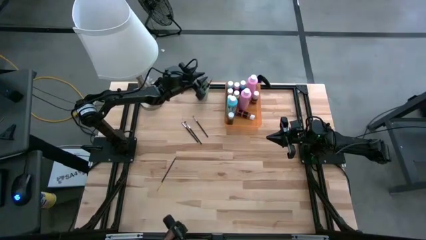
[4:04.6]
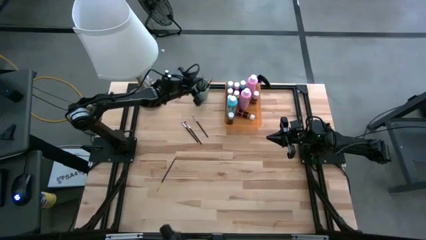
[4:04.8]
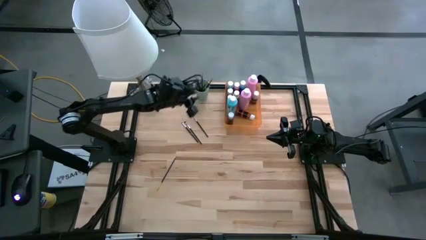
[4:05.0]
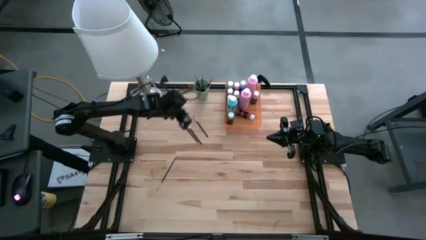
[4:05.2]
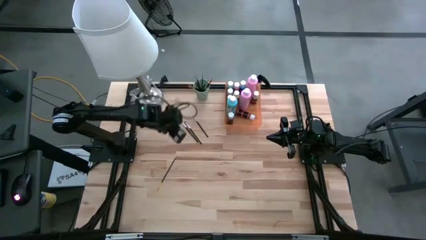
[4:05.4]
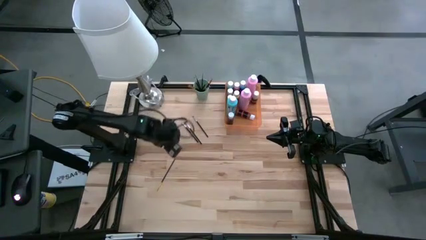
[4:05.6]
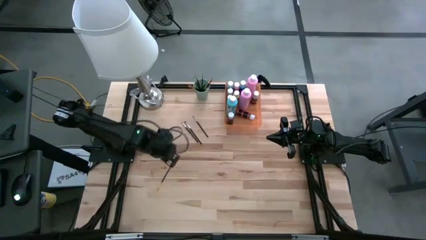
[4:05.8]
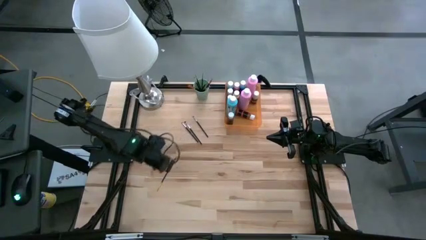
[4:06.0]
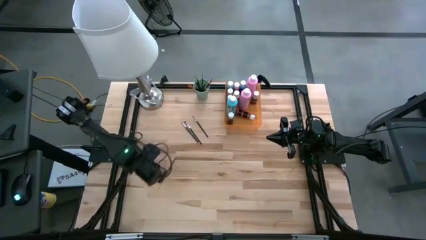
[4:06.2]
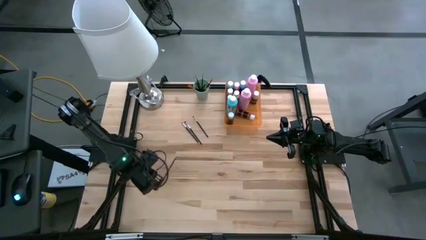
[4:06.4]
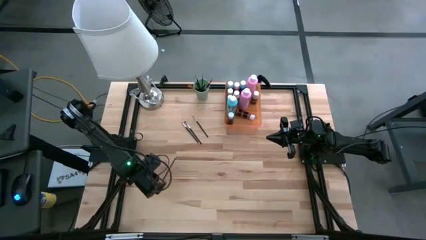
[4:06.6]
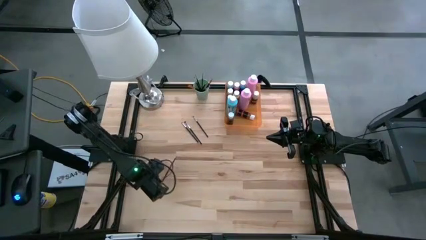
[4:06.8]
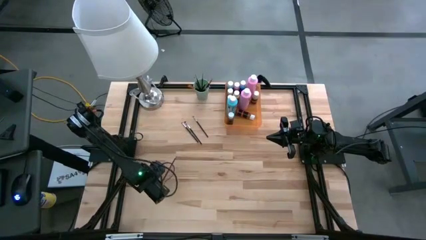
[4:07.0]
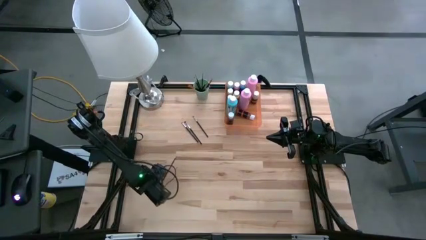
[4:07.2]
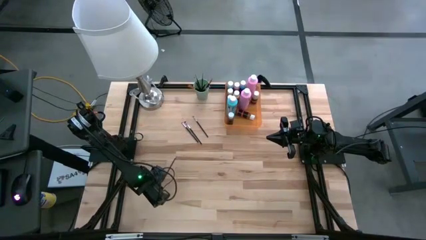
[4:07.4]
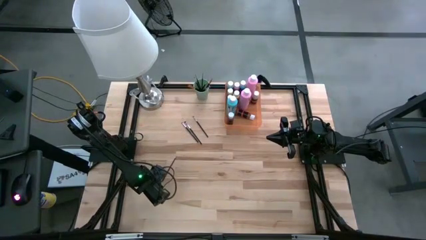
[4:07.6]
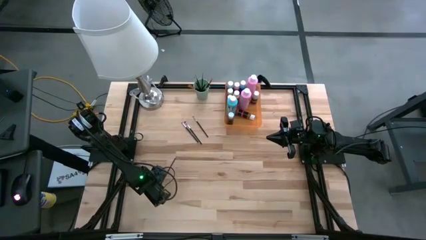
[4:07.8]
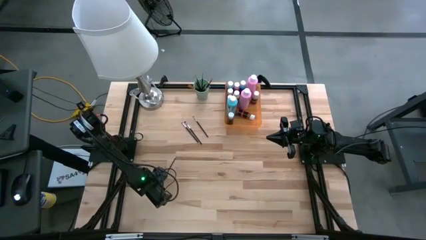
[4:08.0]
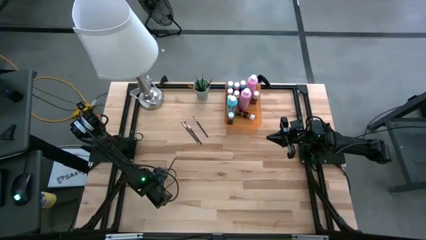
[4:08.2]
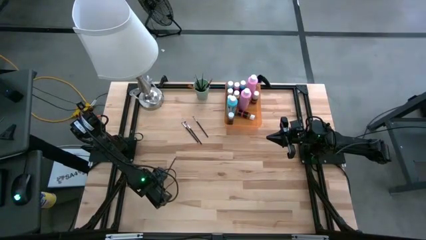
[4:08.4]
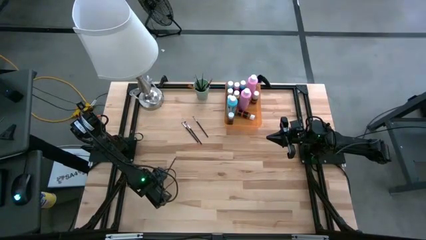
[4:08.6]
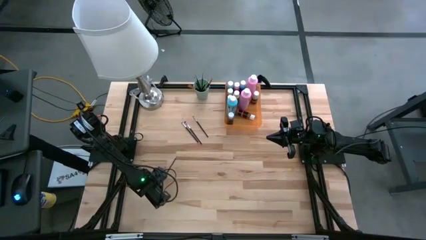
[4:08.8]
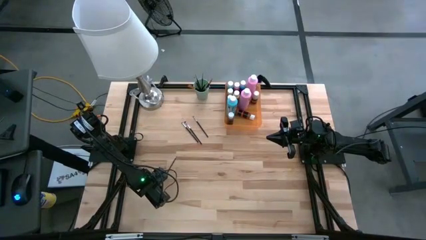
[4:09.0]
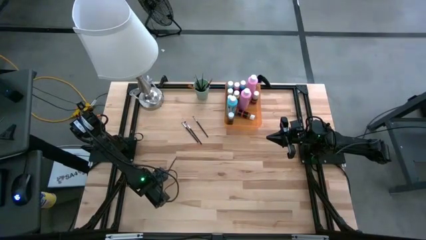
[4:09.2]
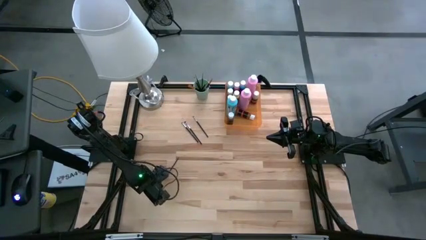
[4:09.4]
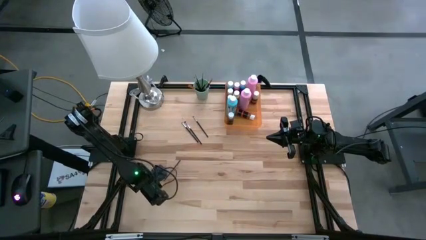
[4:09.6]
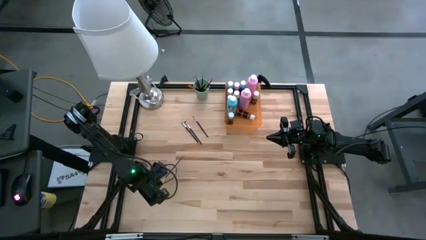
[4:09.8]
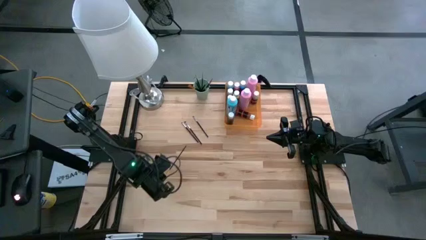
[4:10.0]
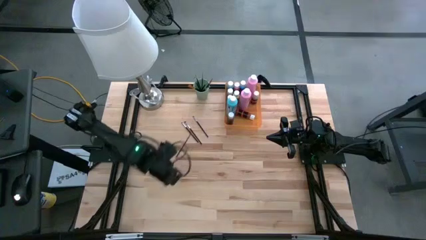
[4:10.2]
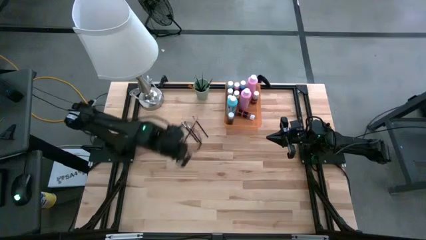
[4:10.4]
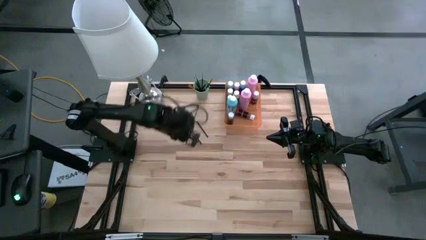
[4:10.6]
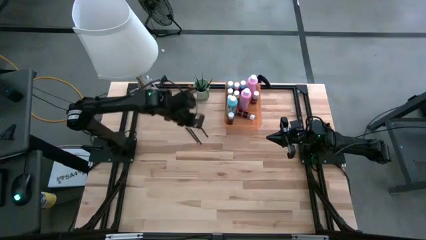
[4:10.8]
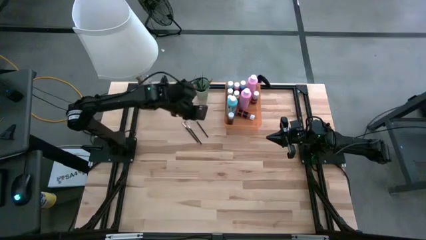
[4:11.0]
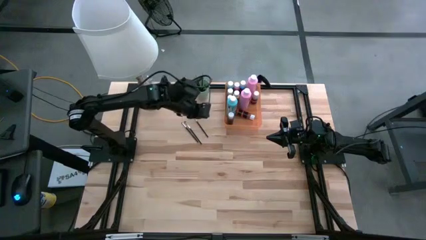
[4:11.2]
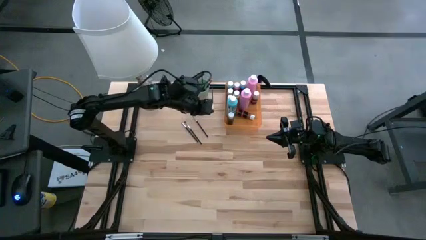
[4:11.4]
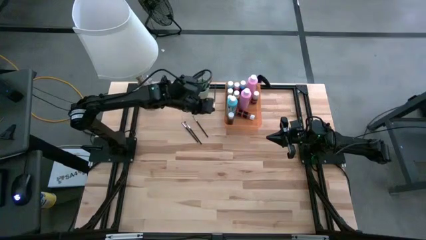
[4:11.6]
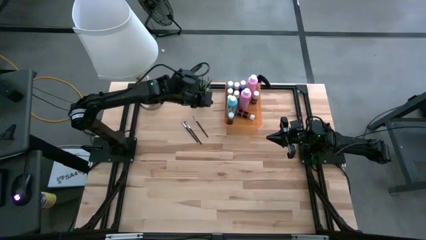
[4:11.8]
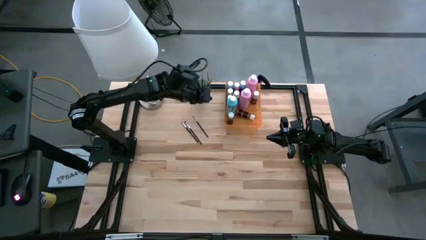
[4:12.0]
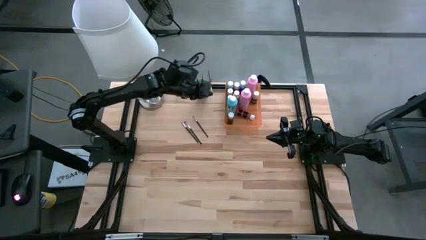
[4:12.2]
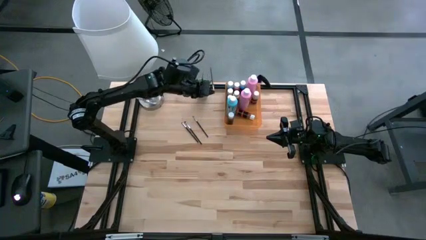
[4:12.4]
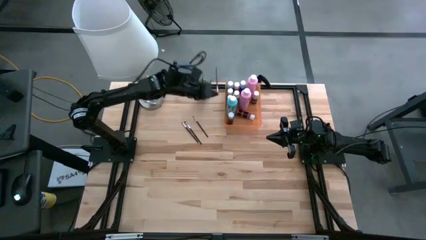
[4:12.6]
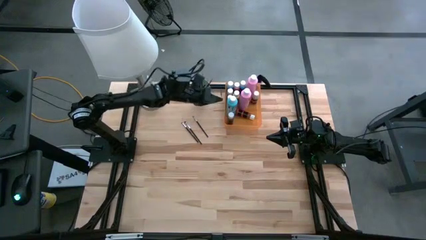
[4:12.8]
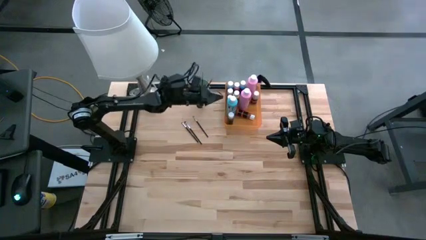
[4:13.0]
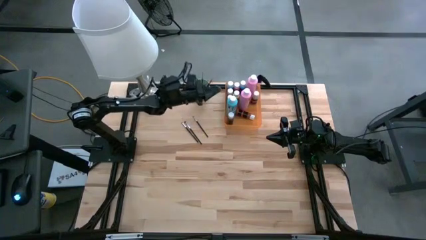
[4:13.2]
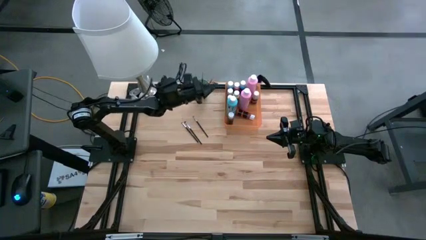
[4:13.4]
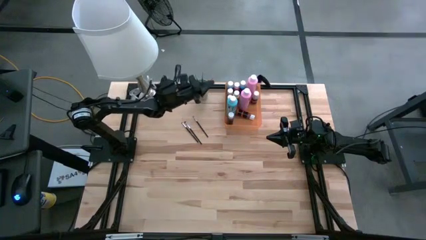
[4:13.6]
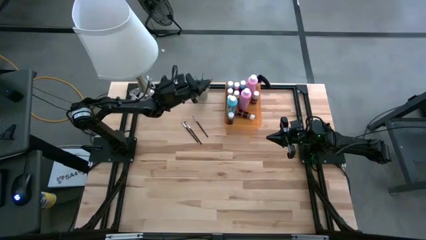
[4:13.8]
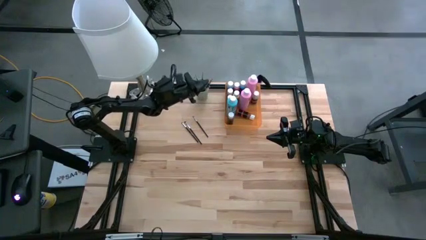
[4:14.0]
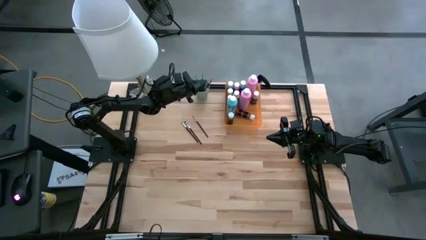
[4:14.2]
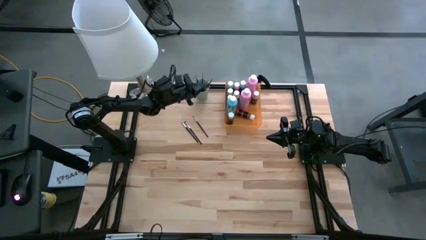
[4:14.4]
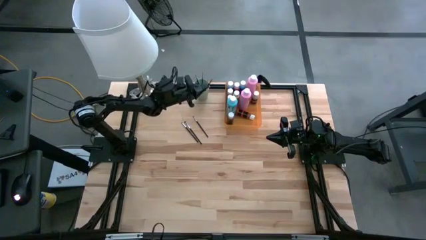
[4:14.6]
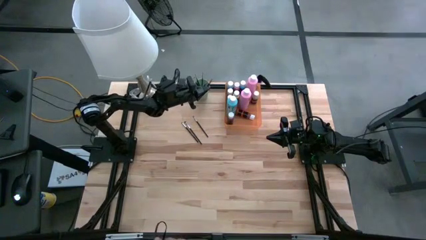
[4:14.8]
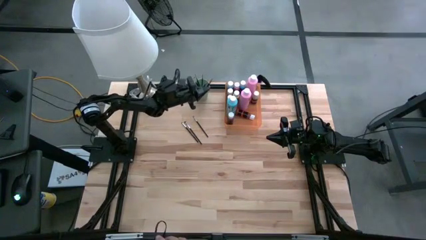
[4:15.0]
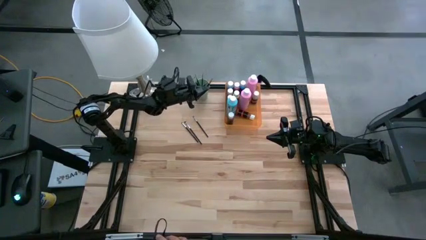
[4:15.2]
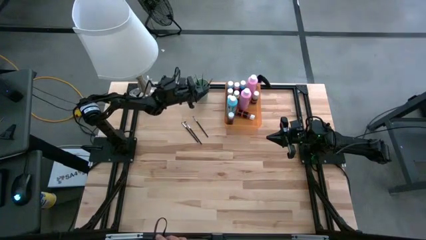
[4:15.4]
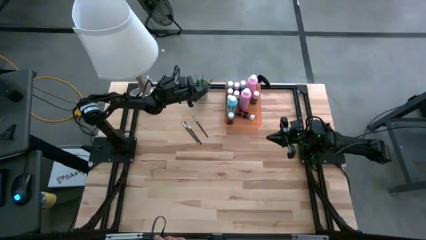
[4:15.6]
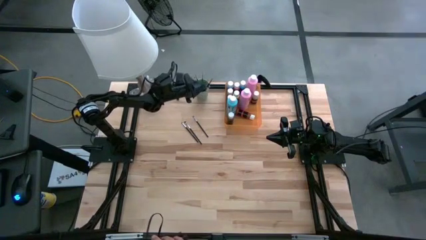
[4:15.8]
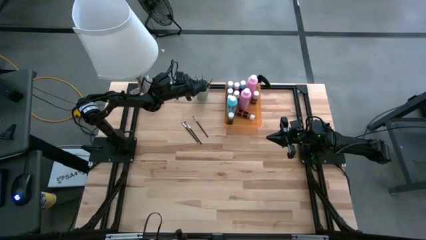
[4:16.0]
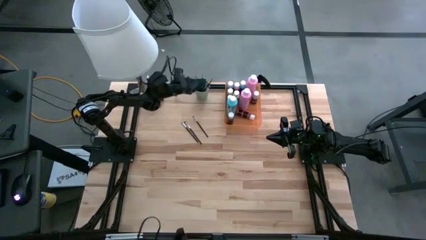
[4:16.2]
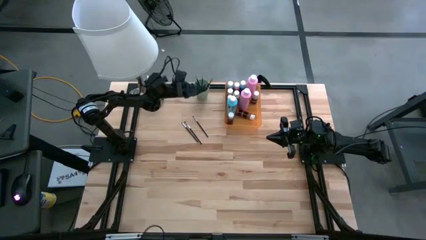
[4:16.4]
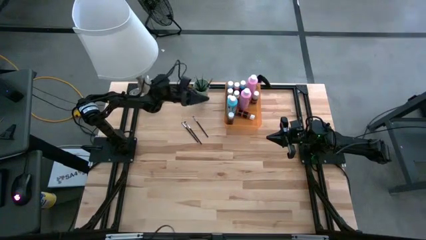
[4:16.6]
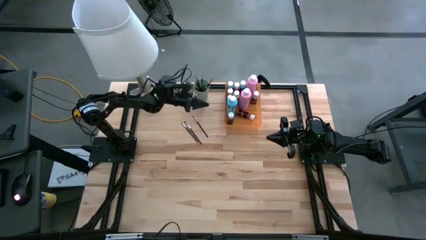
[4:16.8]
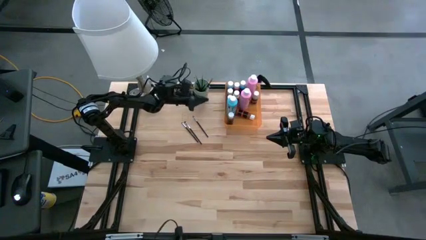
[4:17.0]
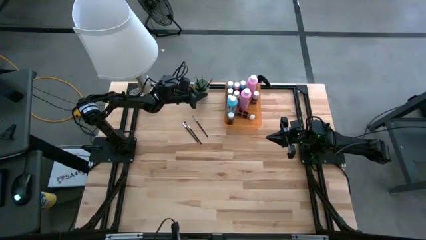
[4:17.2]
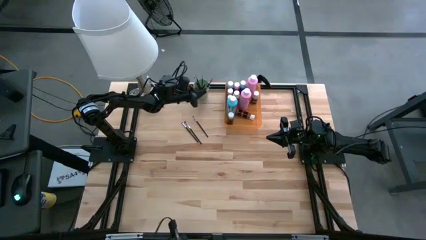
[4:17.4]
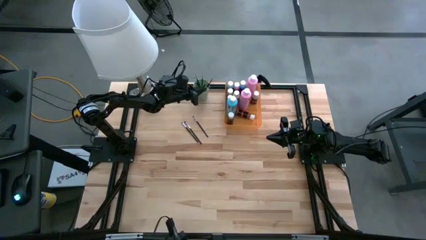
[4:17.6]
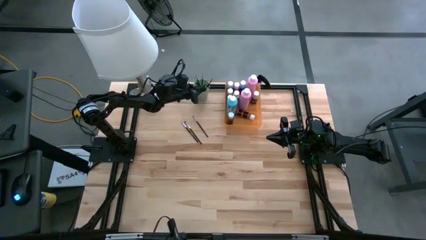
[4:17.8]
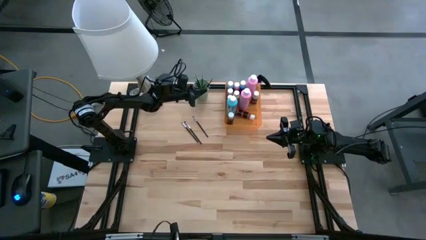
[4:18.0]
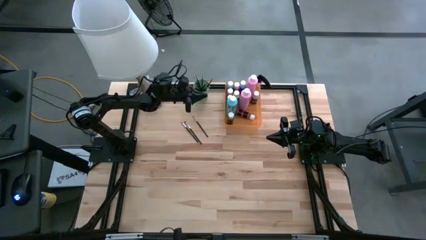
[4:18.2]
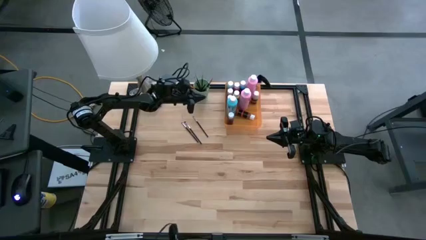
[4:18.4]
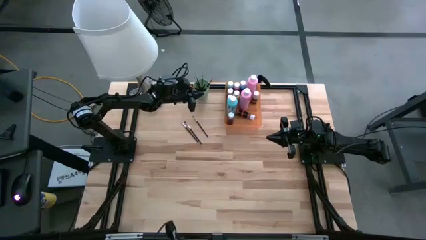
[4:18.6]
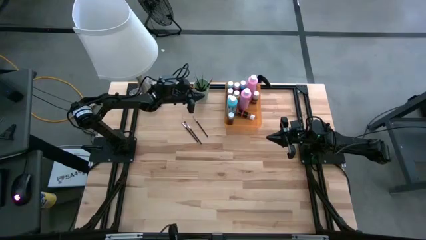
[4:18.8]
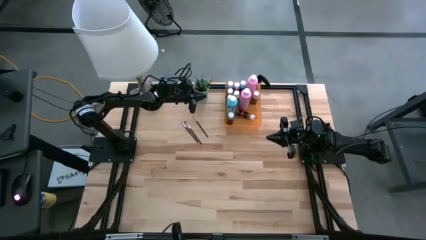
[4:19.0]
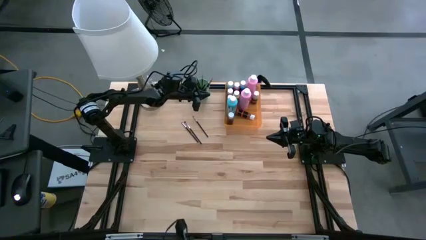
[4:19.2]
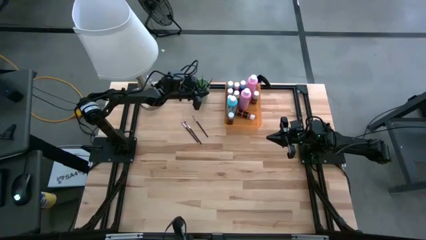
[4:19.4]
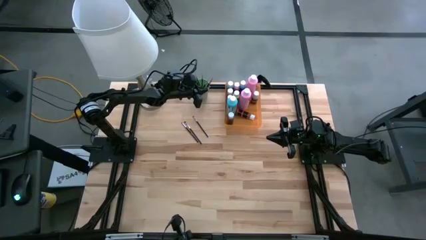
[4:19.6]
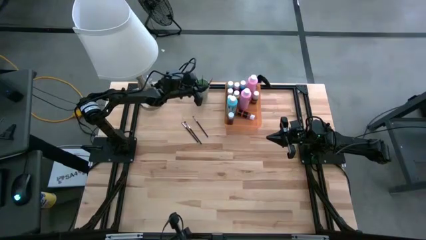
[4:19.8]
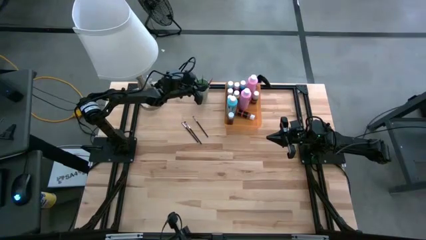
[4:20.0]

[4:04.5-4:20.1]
Task: Pick & Place Paint Supplies
Put the yellow paint brush into the green cup
